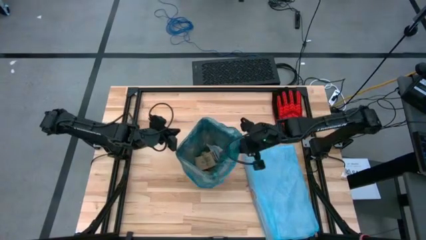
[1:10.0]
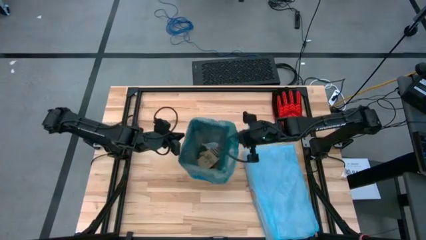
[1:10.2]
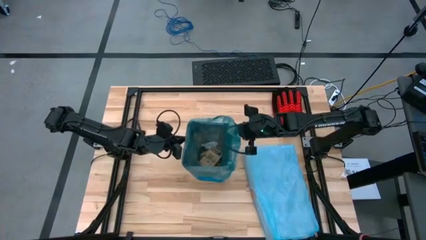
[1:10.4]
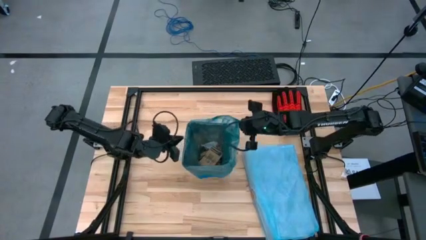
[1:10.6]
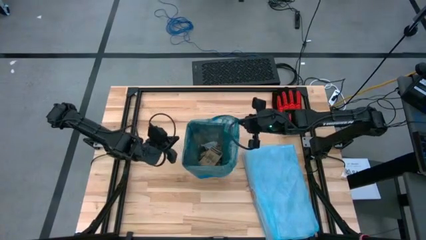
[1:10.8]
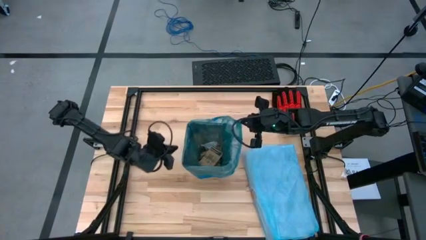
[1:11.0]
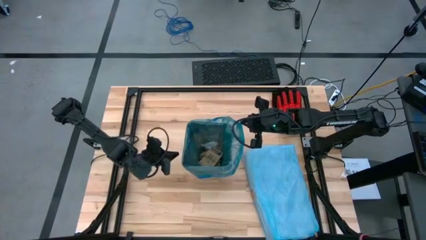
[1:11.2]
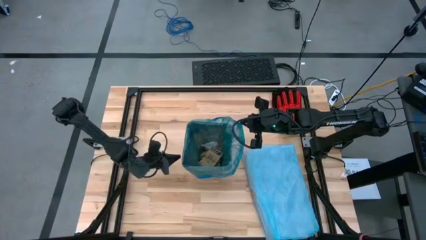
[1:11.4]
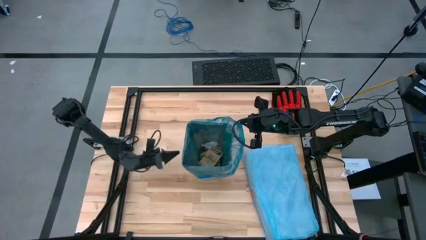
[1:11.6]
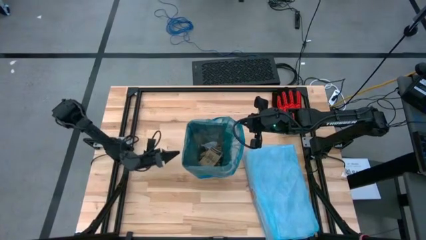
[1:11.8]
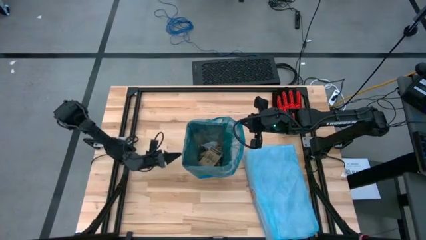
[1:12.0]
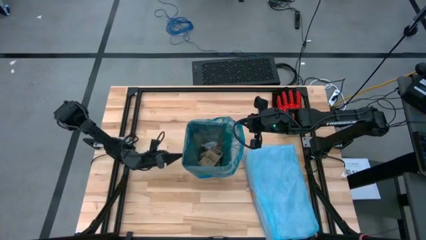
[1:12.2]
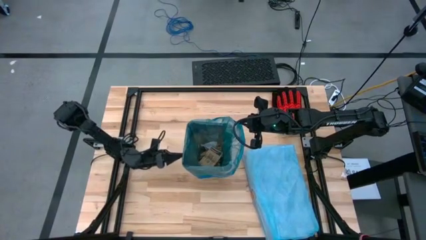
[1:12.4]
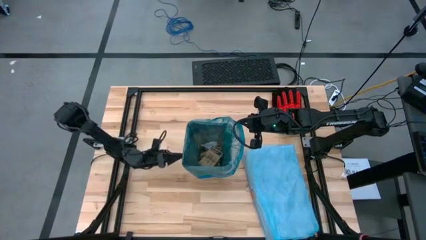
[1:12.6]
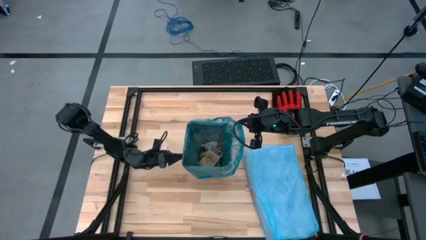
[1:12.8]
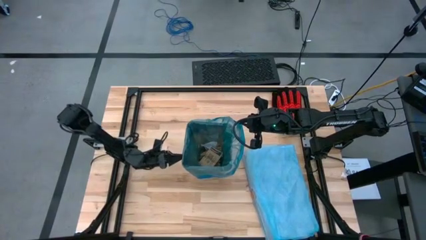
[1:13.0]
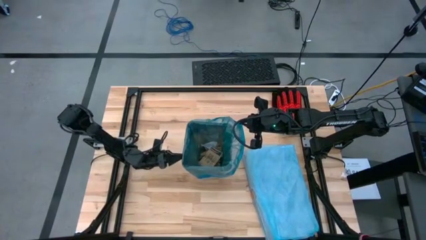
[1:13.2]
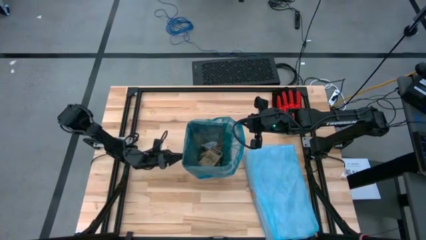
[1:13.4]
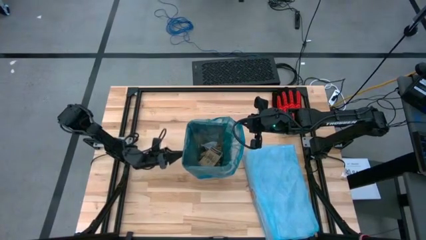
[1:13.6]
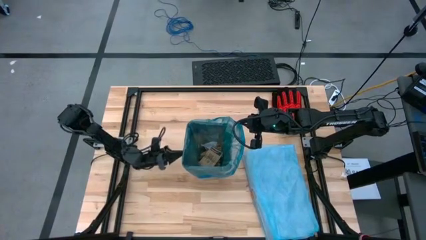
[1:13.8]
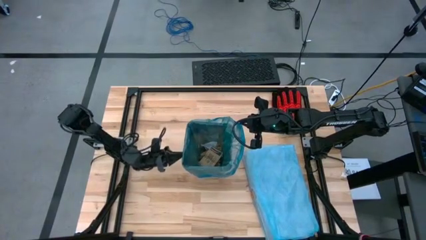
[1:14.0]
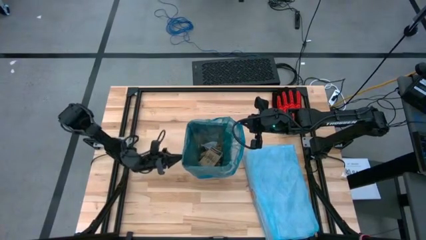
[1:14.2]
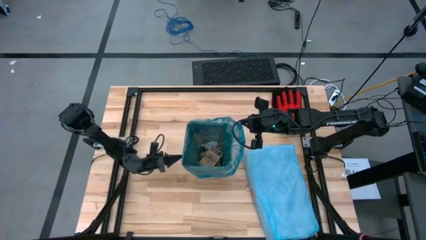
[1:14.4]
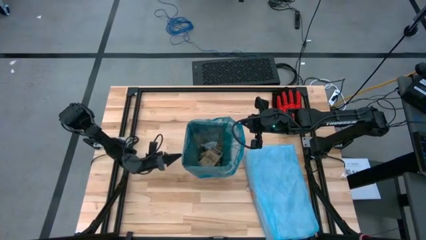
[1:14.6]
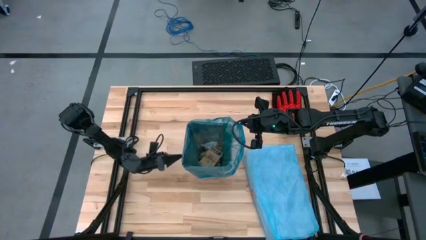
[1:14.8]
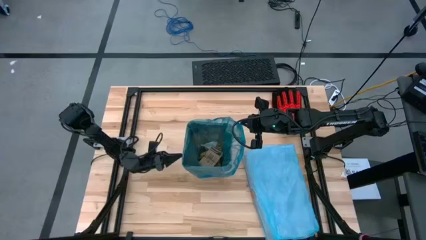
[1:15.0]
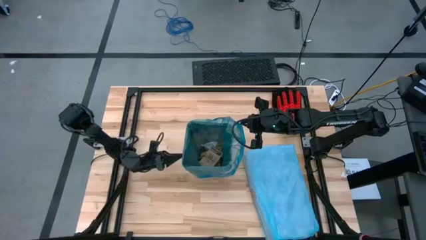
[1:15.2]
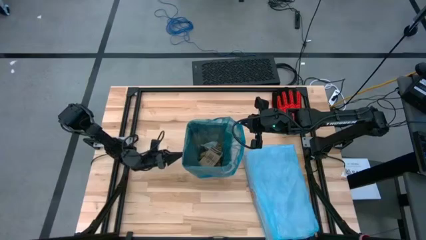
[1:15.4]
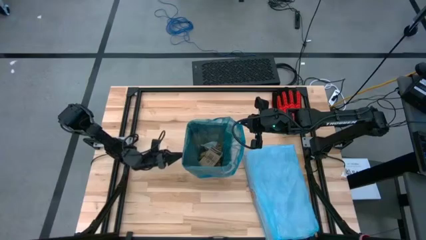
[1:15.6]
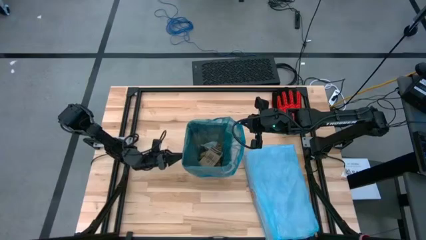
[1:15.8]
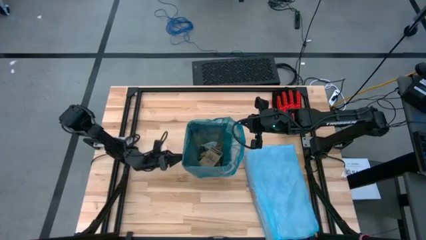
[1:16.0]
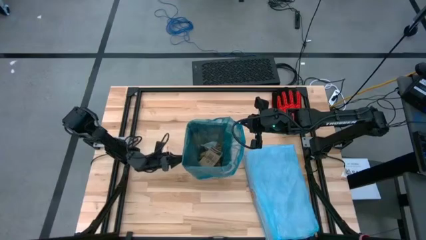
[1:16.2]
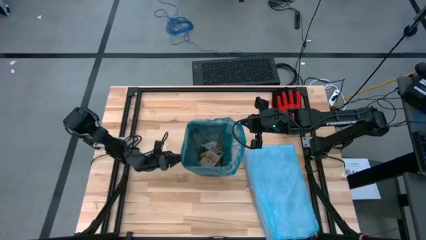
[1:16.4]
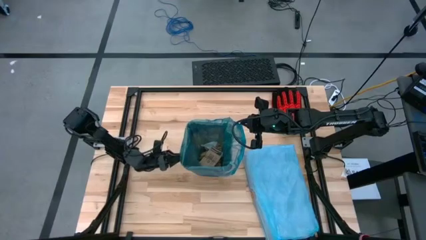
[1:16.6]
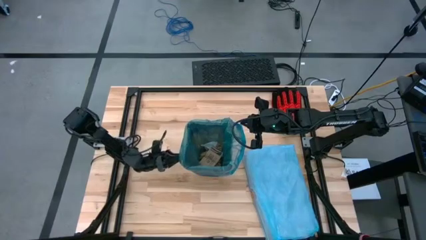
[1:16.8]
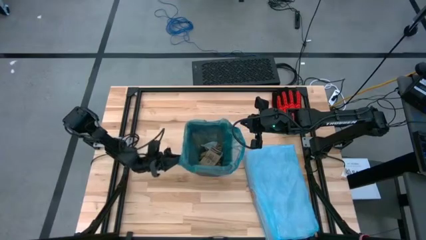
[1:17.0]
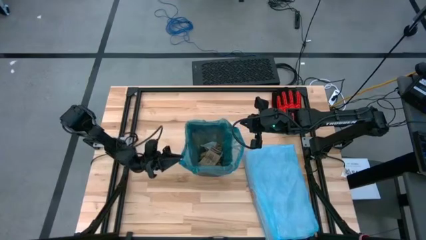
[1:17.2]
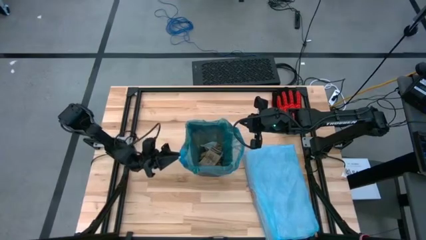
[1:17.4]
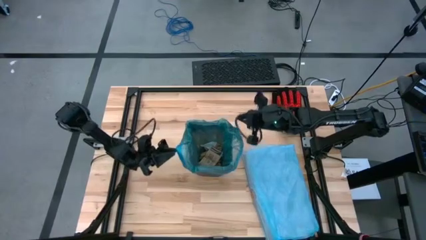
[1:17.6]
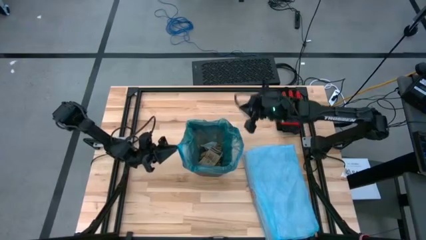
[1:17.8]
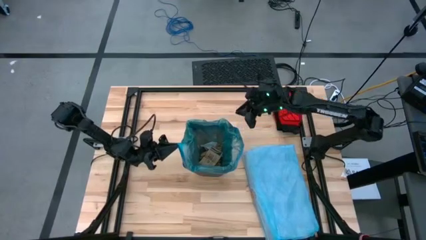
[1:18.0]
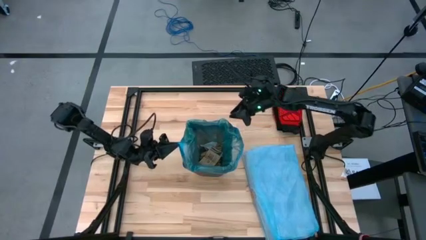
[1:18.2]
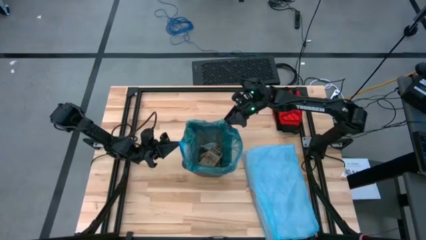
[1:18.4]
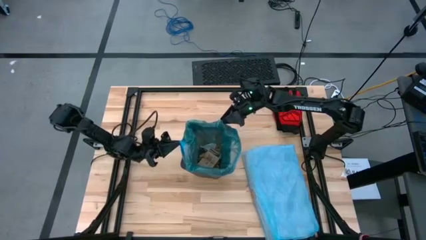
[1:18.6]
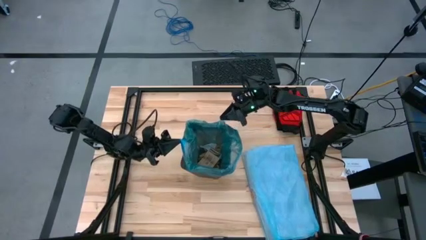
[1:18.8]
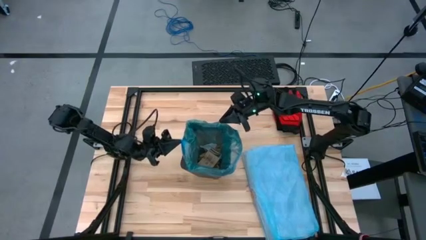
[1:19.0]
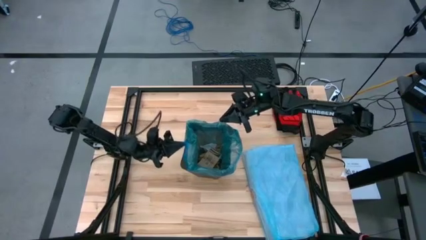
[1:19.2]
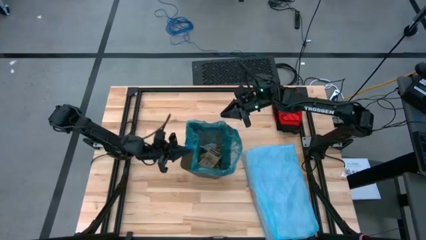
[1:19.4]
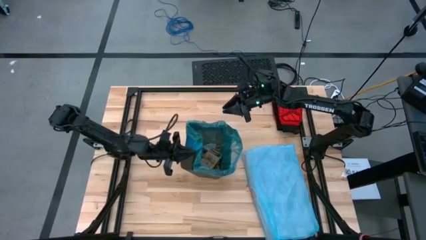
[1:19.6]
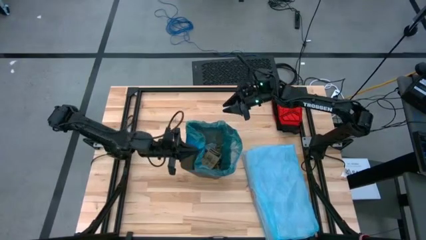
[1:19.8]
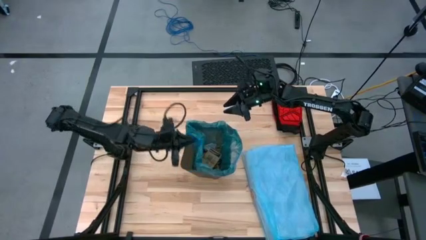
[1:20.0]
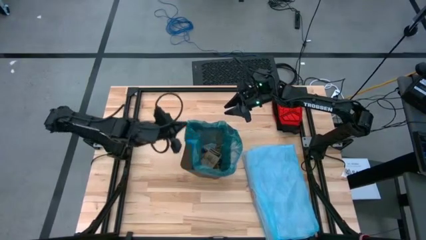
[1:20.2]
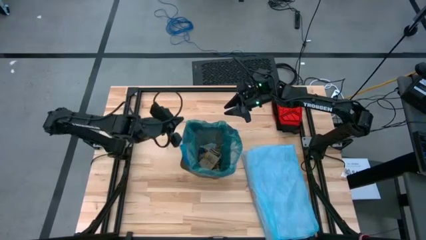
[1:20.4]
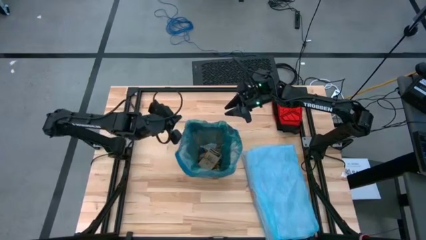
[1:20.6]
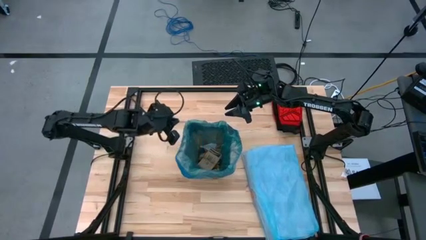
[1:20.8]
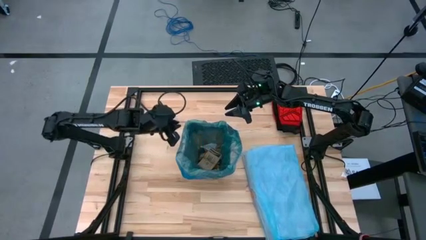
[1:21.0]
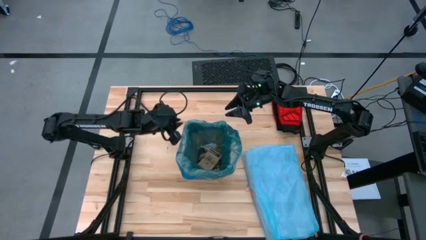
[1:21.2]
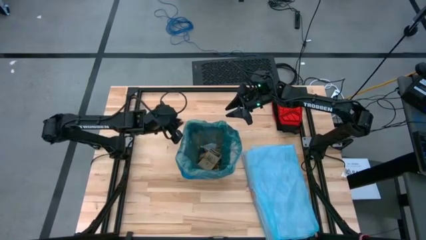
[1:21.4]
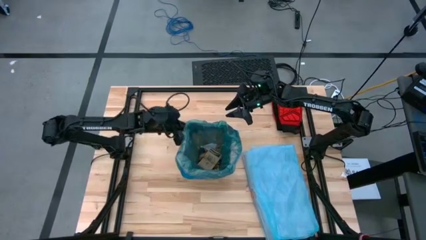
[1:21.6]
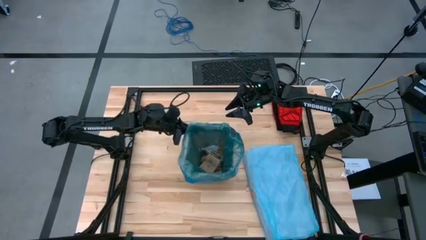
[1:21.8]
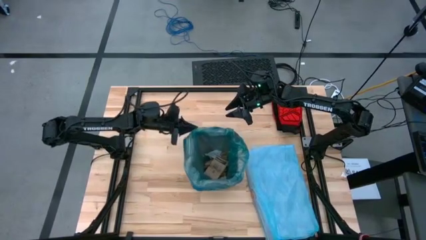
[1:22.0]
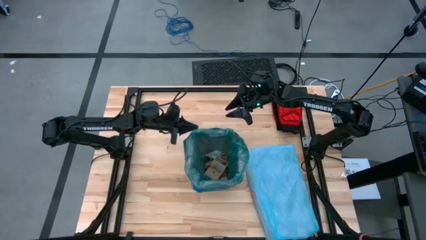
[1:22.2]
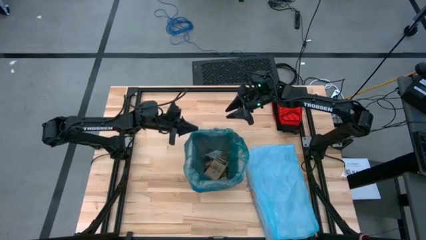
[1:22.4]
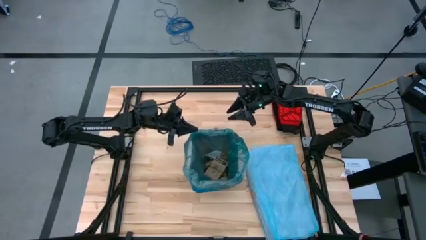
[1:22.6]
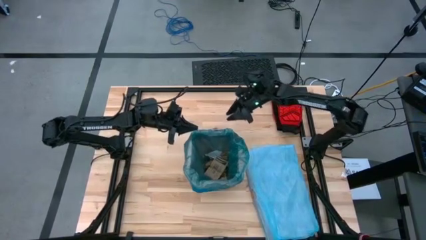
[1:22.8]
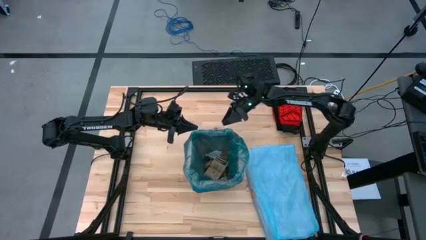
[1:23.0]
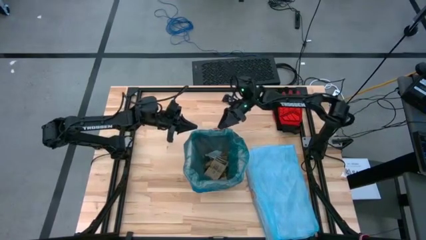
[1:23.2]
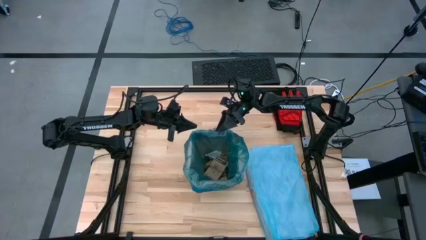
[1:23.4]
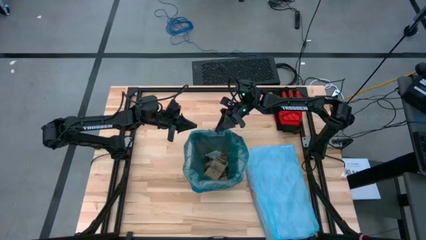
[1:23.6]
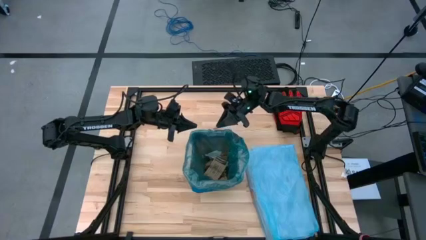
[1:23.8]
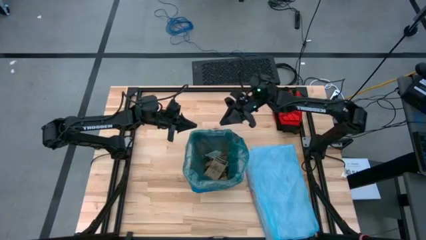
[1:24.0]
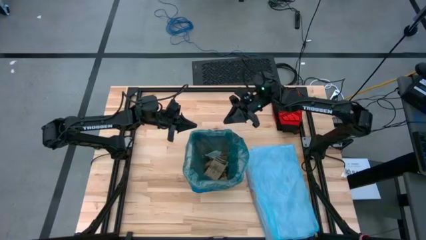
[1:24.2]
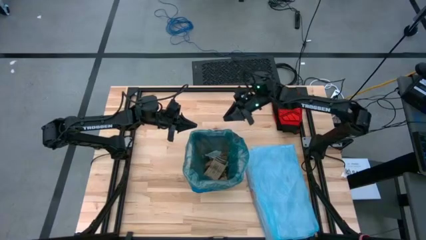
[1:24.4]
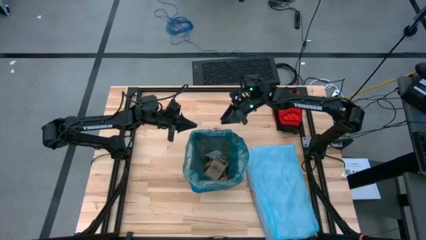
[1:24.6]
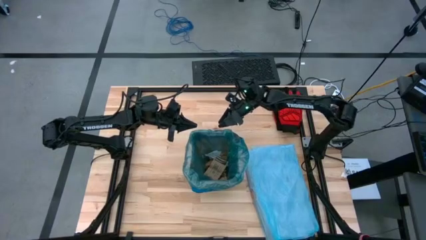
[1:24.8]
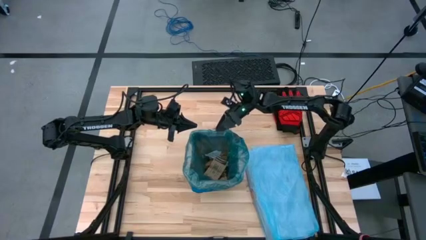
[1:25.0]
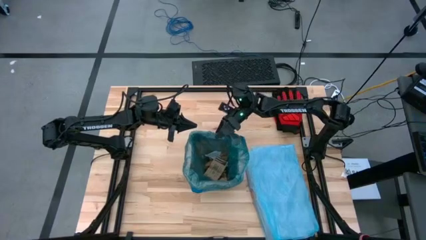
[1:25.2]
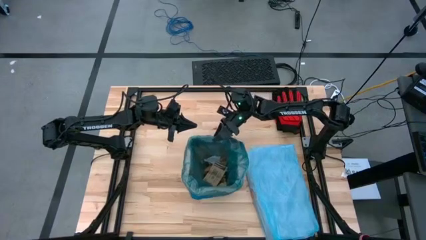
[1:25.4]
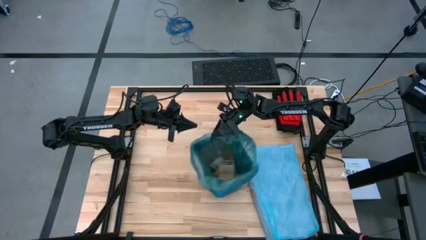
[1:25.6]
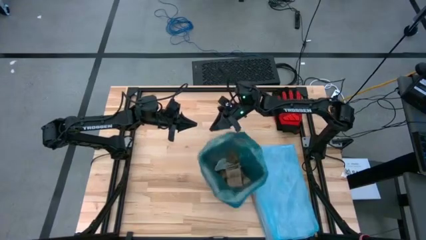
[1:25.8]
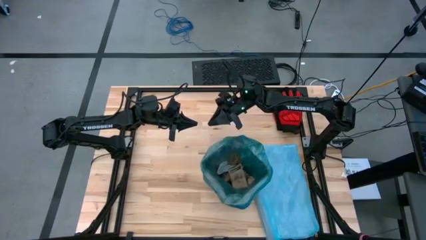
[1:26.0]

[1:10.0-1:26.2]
Task: place trash/remove bag and relplace
Remove the trash bag from the bin
